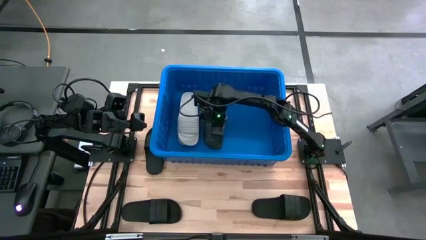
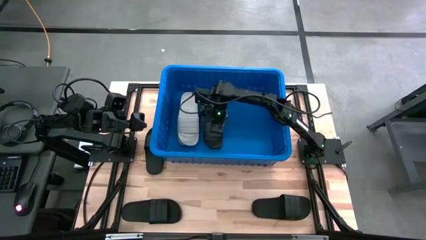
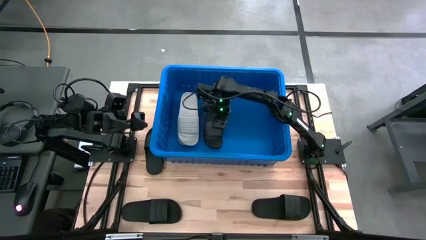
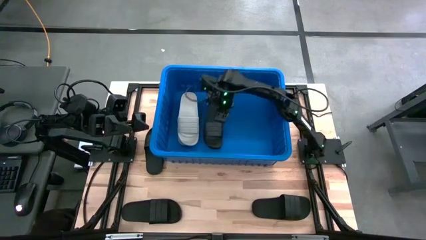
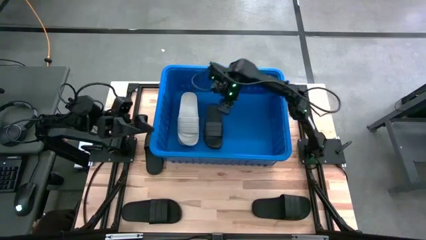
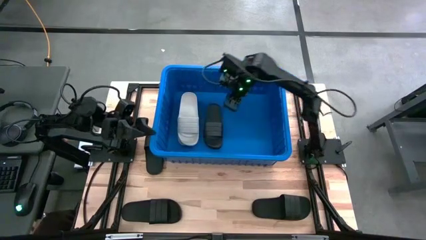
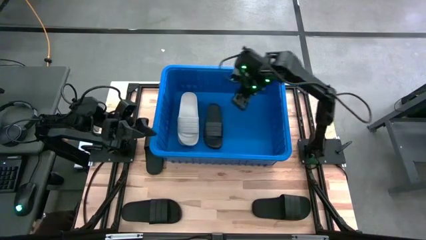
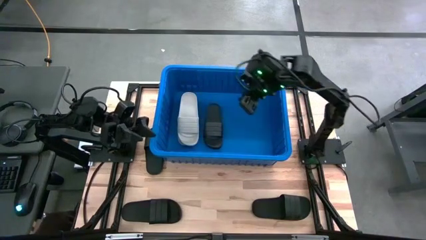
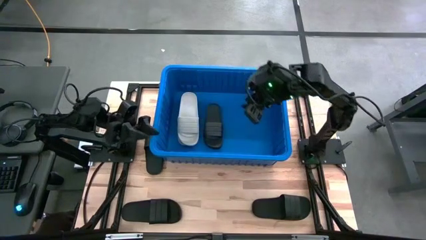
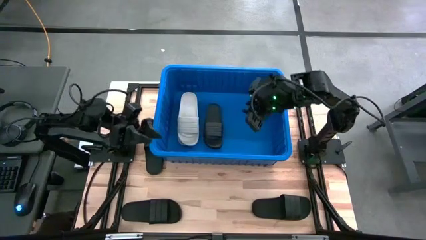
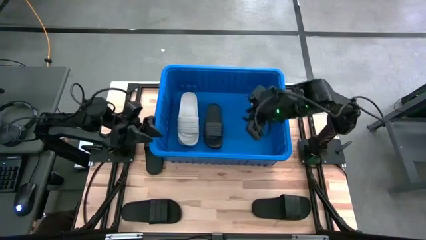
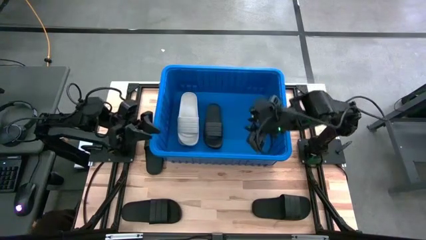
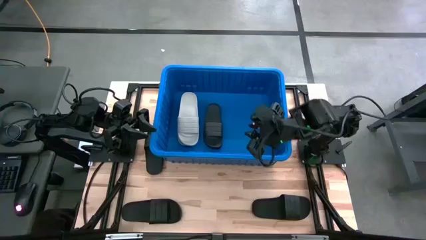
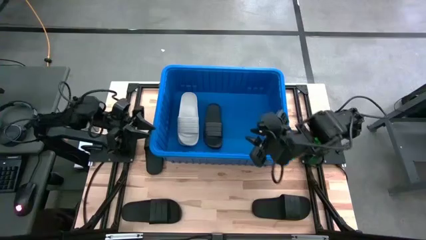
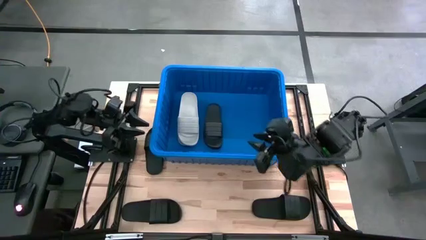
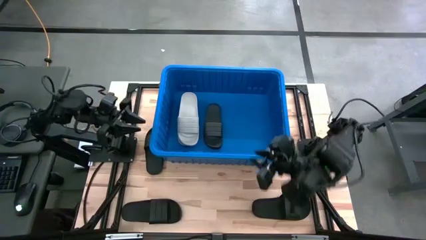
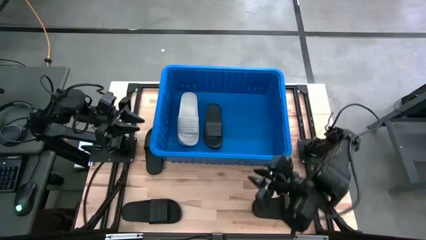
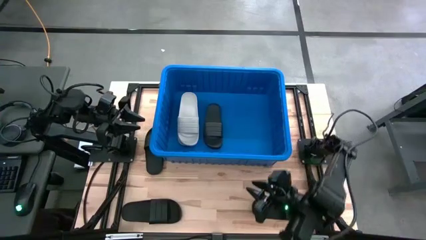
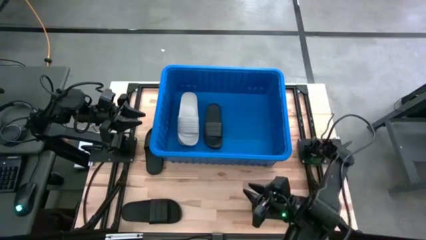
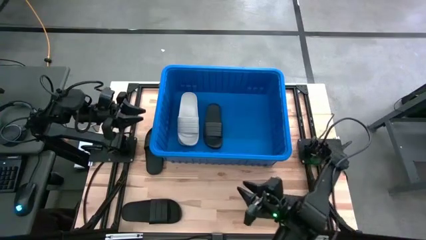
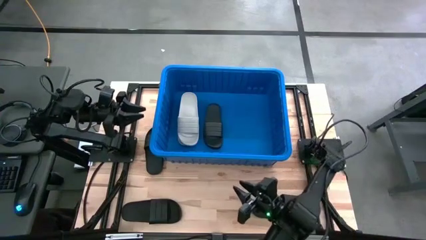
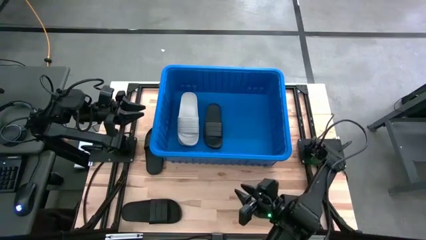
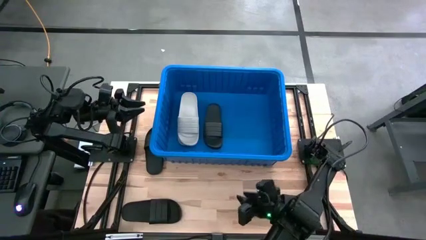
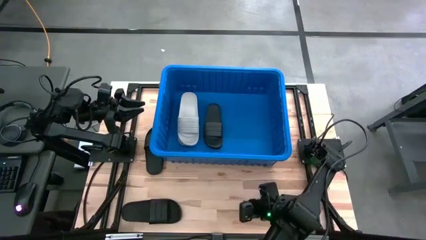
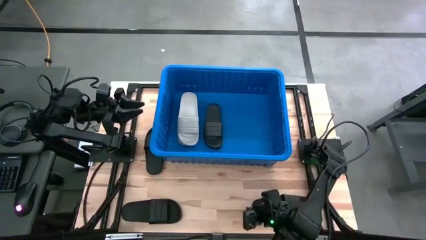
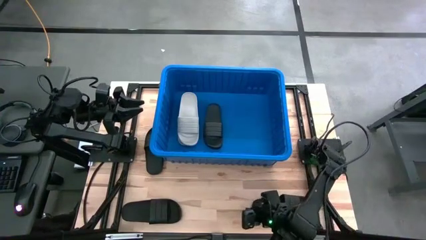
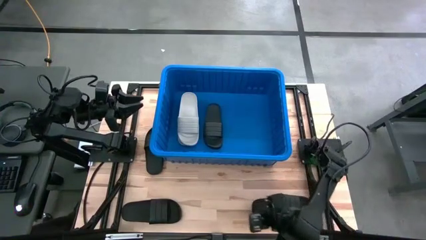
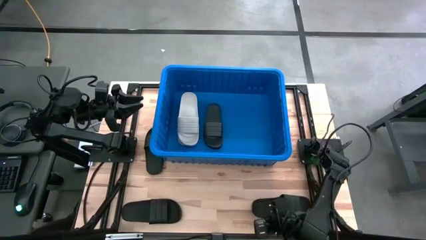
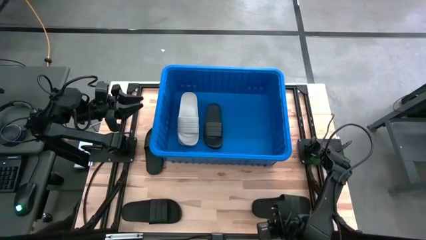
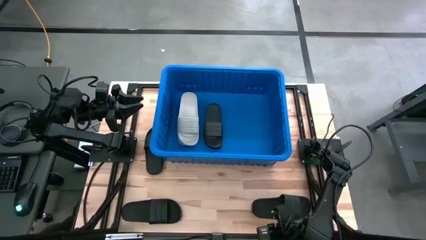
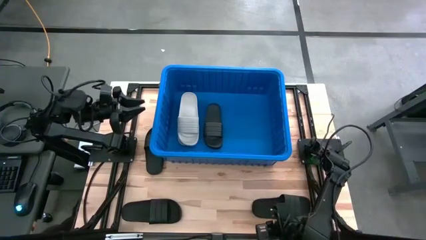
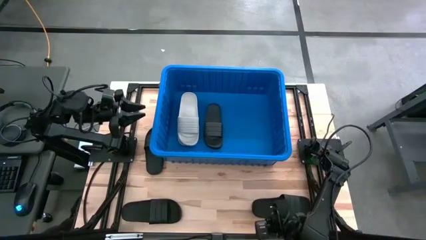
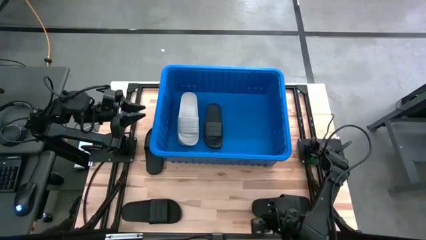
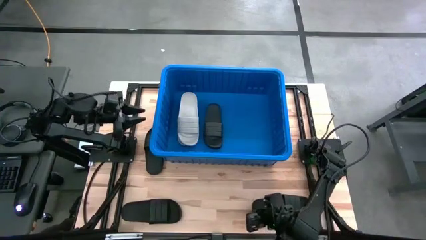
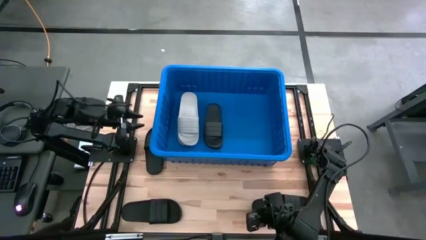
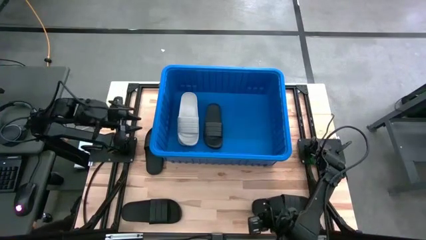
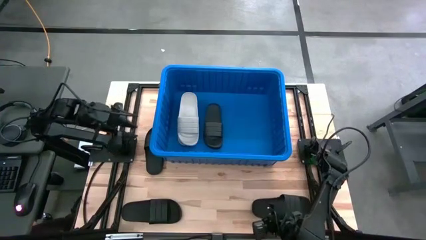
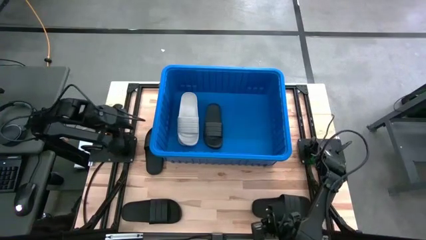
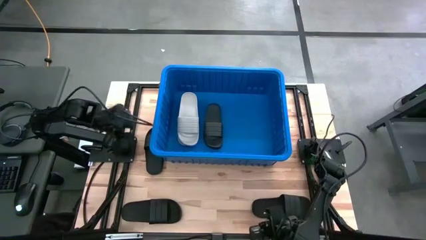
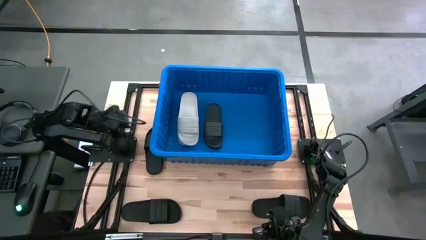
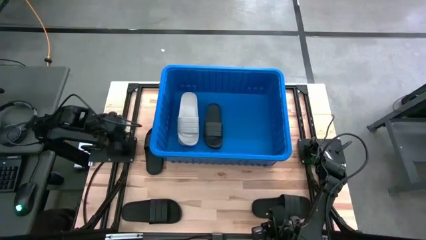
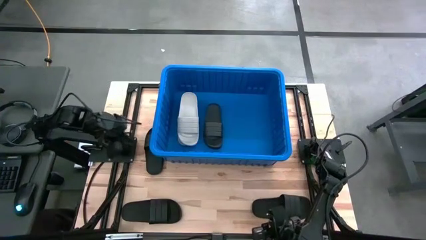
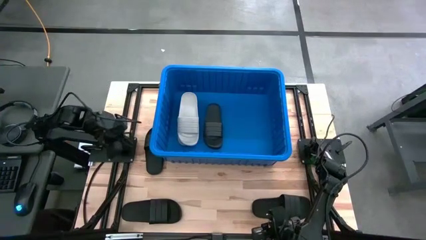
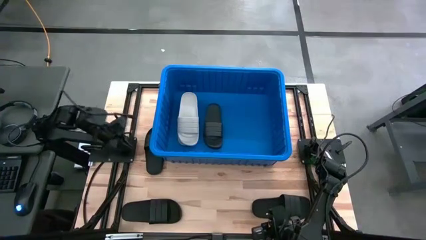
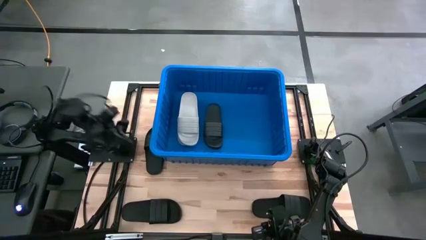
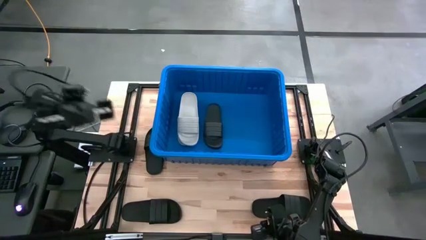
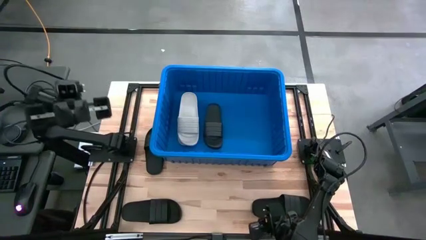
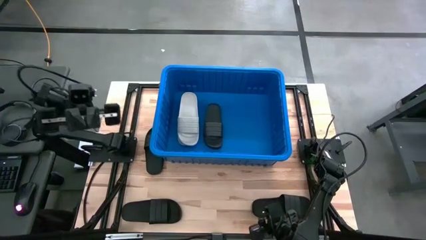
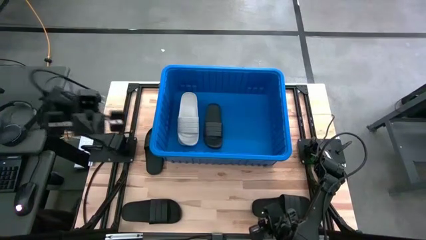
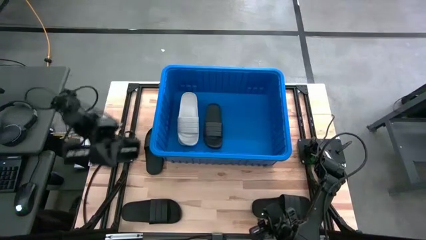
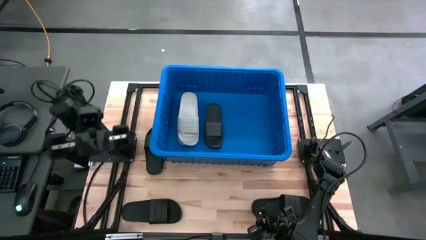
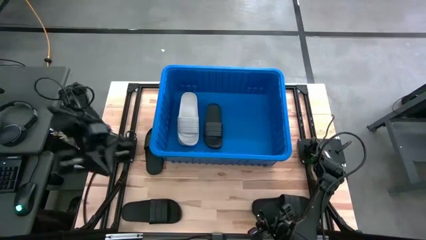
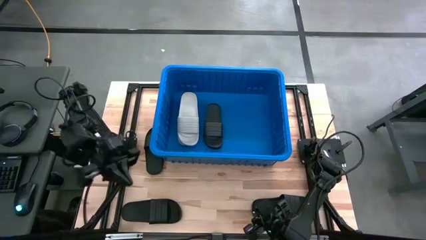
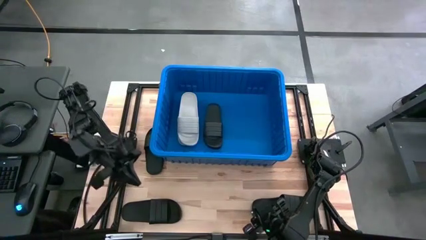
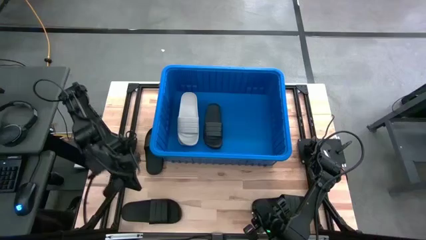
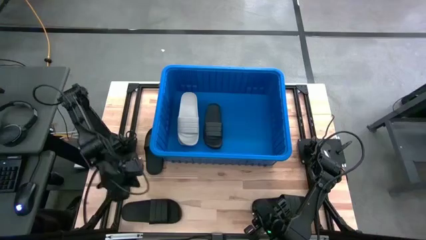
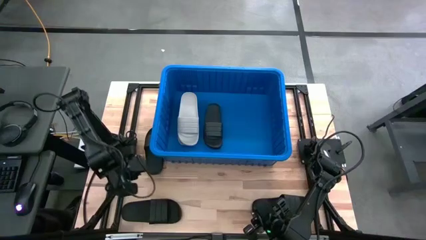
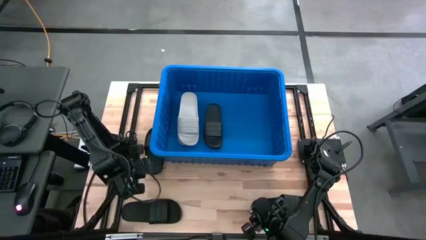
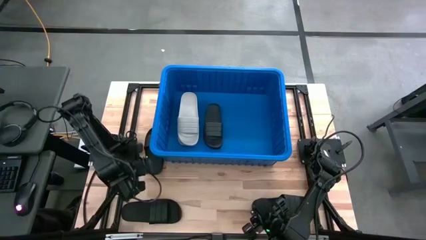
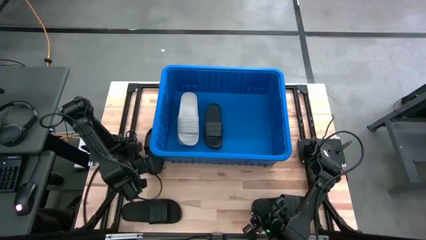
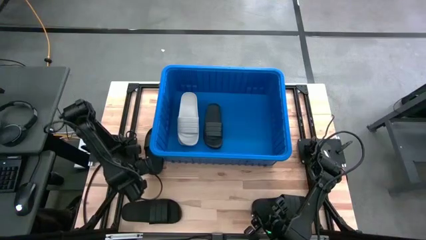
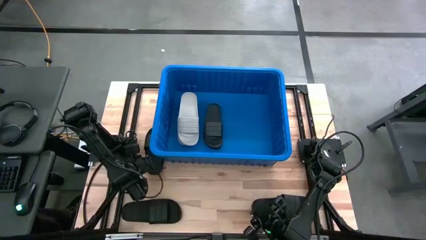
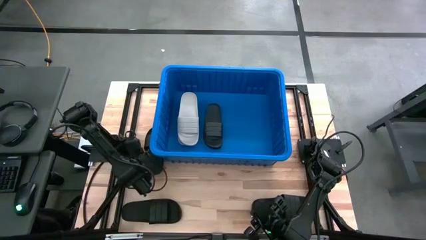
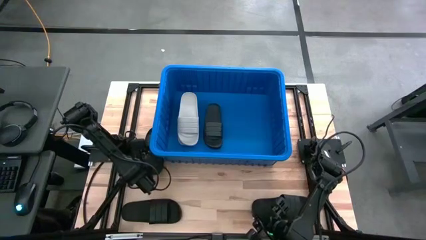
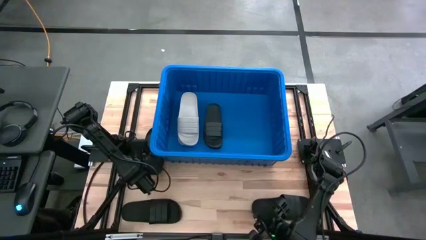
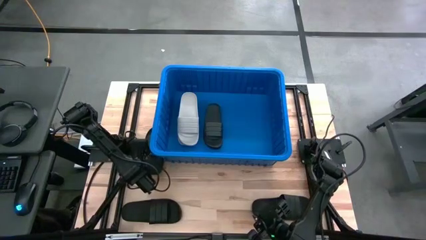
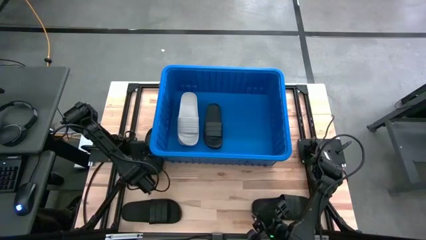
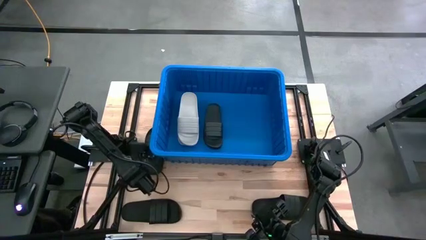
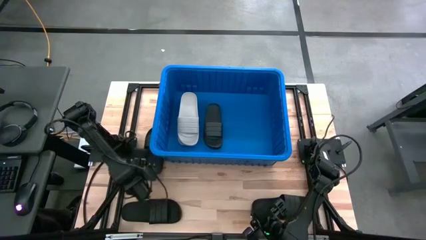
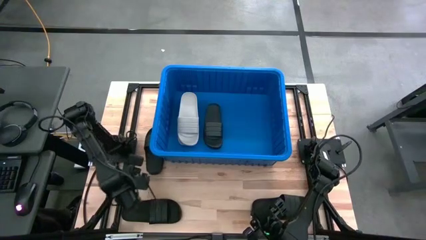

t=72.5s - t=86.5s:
Task: Pick and place slides into bin
Stack the black slide on top of the black slide in the blue bin
